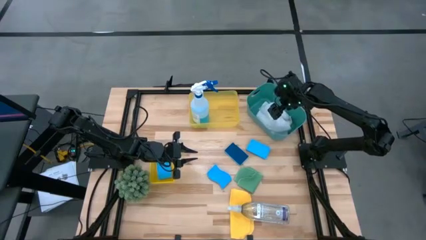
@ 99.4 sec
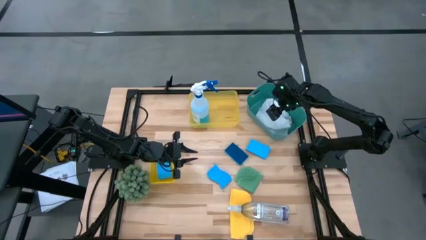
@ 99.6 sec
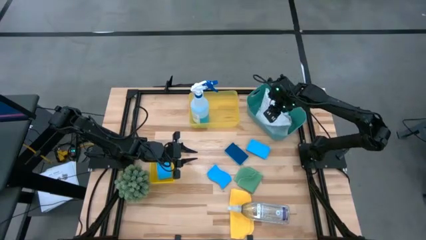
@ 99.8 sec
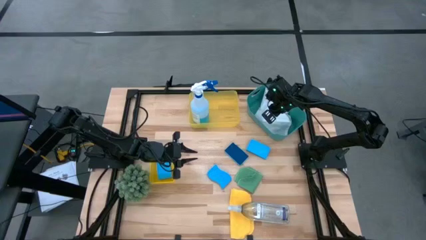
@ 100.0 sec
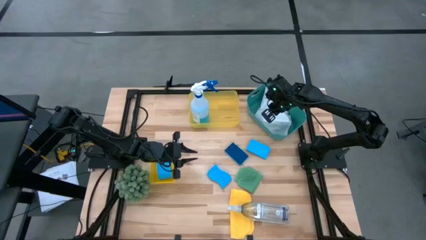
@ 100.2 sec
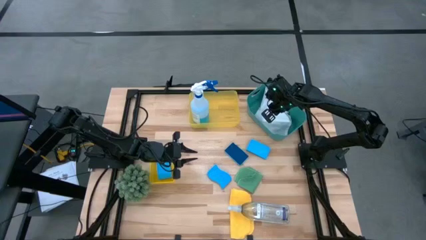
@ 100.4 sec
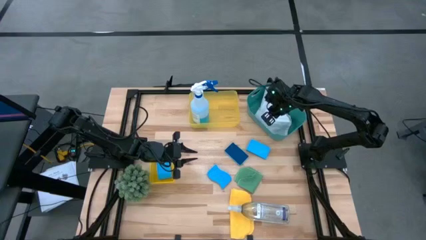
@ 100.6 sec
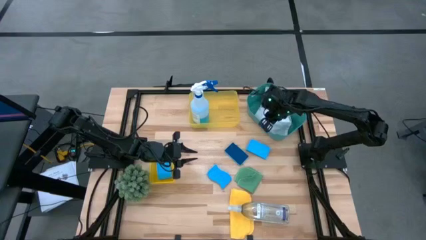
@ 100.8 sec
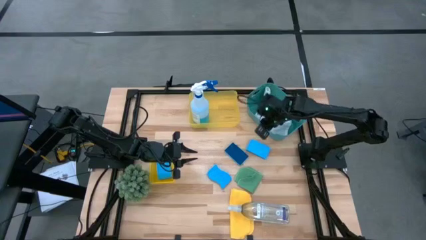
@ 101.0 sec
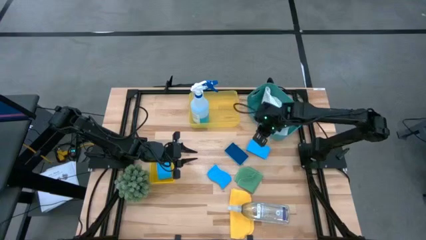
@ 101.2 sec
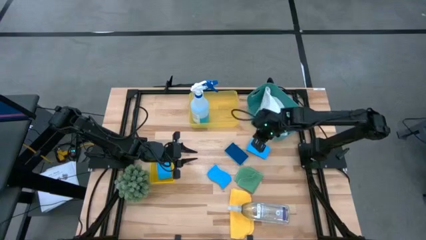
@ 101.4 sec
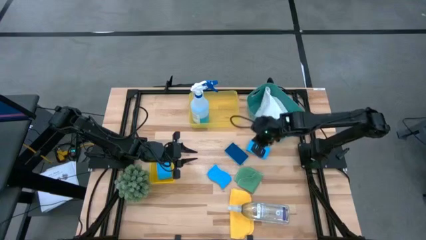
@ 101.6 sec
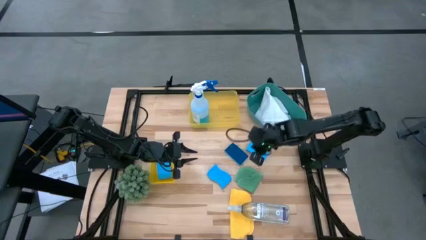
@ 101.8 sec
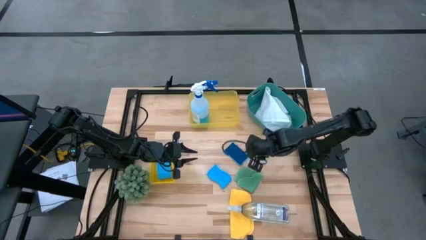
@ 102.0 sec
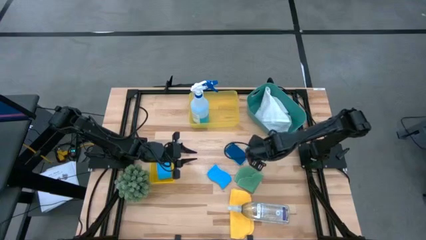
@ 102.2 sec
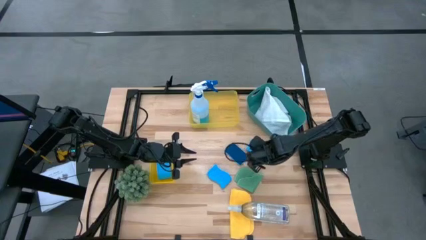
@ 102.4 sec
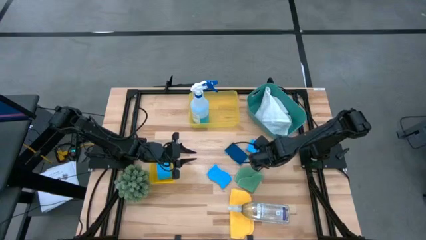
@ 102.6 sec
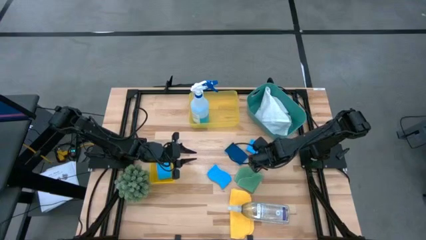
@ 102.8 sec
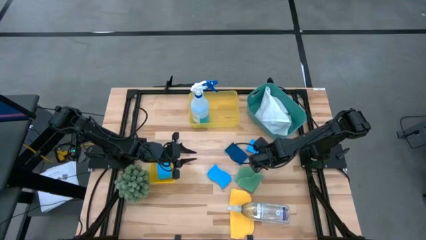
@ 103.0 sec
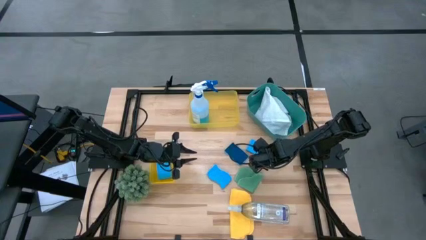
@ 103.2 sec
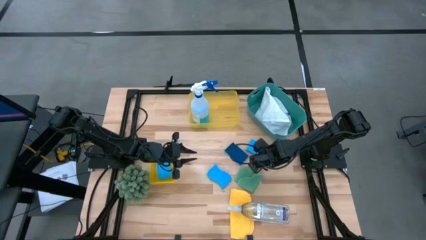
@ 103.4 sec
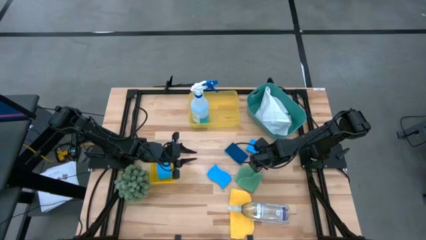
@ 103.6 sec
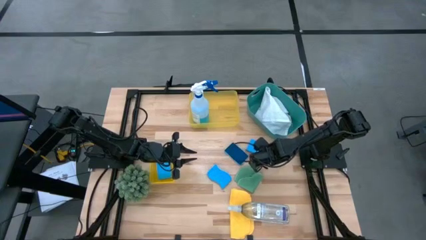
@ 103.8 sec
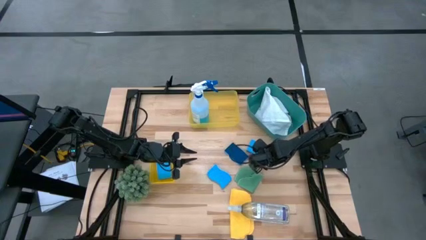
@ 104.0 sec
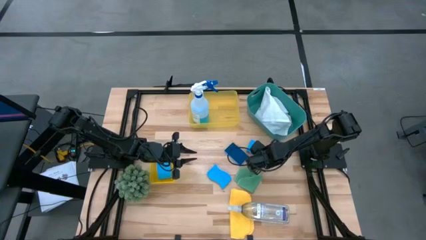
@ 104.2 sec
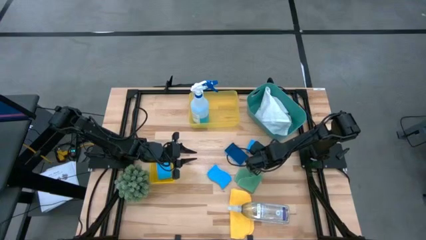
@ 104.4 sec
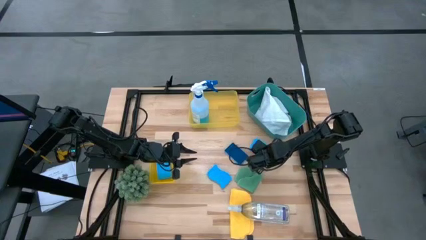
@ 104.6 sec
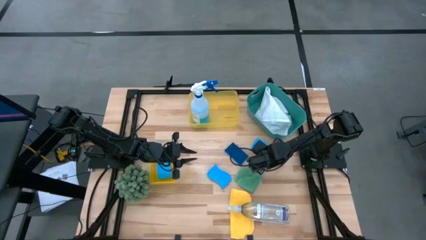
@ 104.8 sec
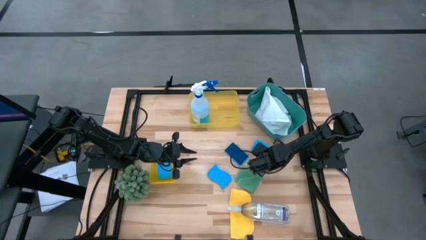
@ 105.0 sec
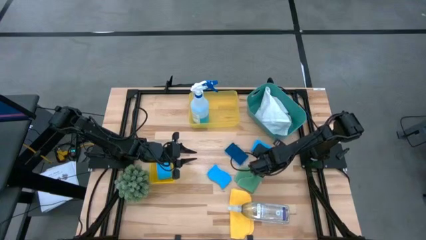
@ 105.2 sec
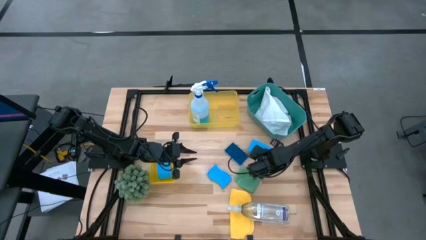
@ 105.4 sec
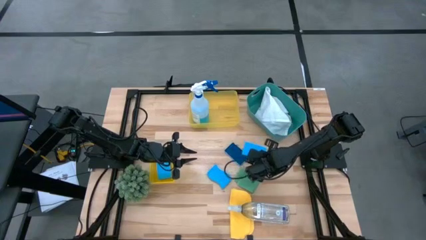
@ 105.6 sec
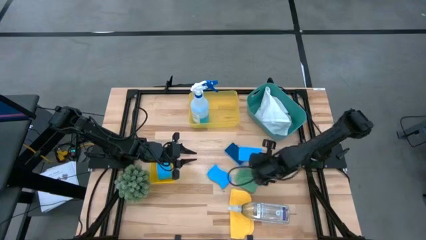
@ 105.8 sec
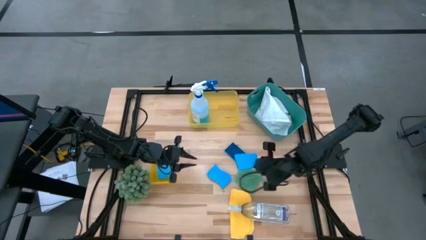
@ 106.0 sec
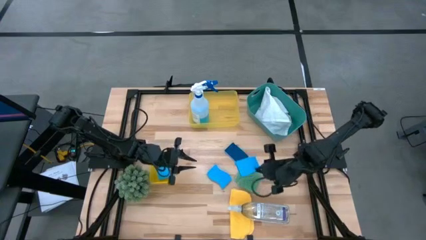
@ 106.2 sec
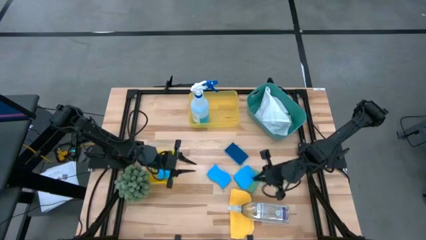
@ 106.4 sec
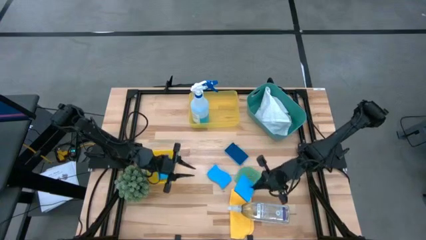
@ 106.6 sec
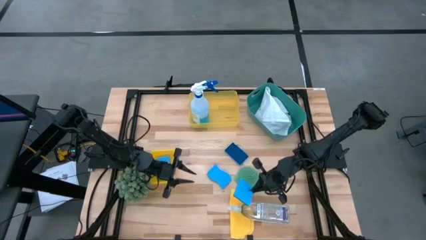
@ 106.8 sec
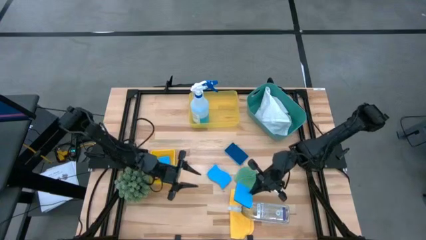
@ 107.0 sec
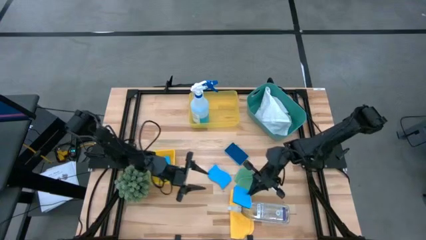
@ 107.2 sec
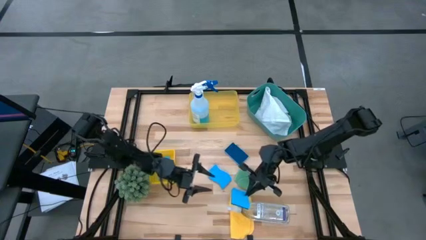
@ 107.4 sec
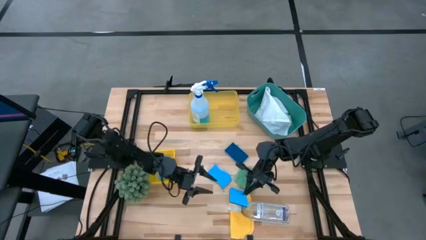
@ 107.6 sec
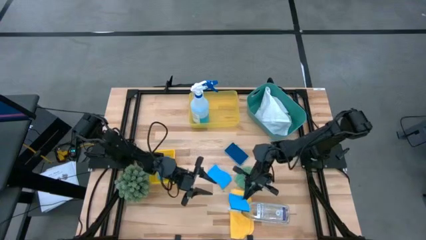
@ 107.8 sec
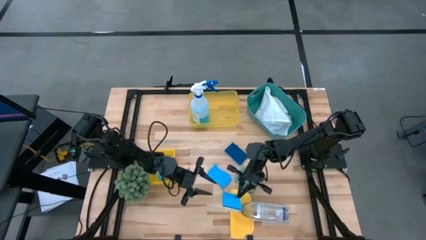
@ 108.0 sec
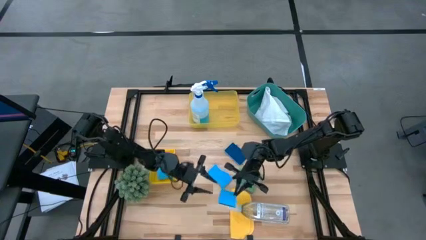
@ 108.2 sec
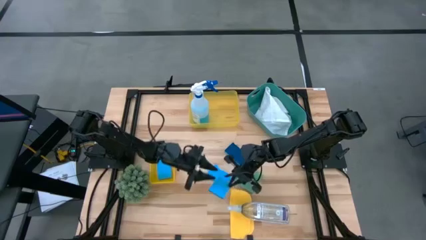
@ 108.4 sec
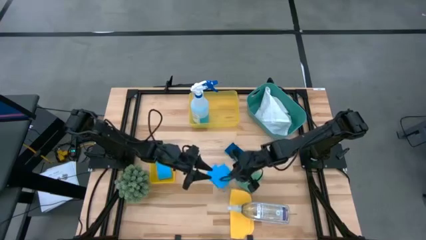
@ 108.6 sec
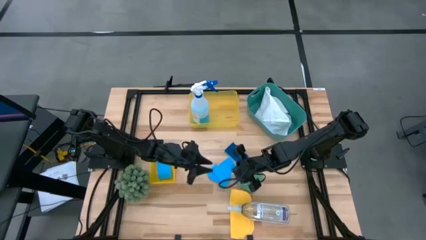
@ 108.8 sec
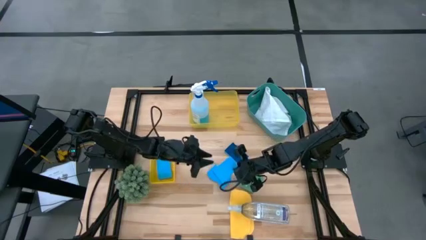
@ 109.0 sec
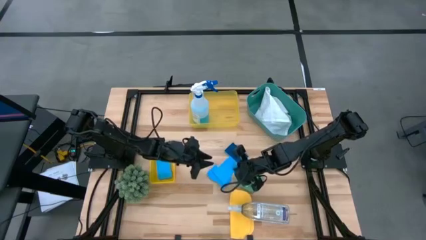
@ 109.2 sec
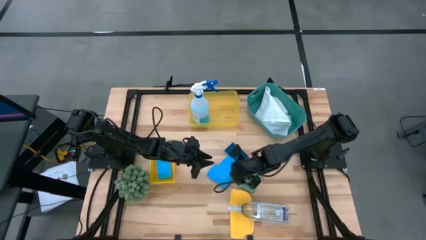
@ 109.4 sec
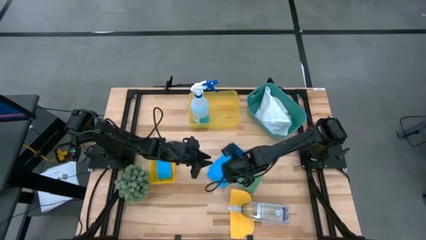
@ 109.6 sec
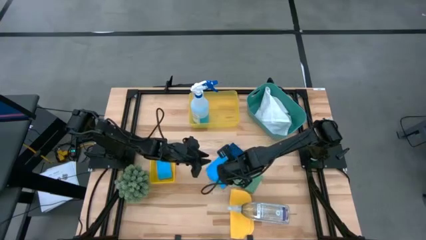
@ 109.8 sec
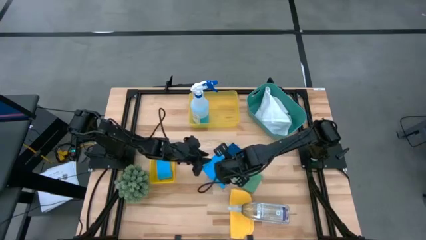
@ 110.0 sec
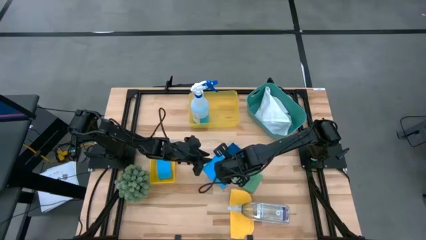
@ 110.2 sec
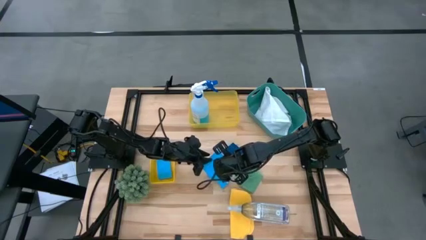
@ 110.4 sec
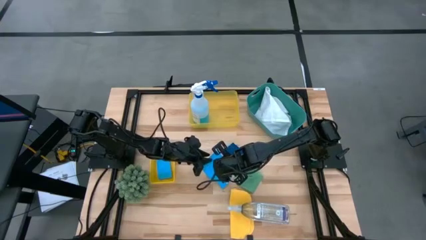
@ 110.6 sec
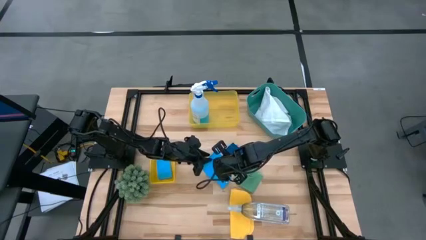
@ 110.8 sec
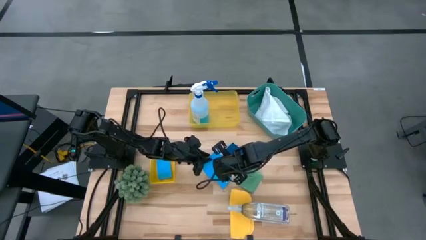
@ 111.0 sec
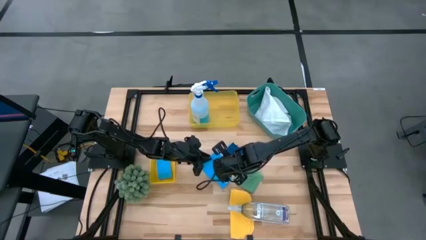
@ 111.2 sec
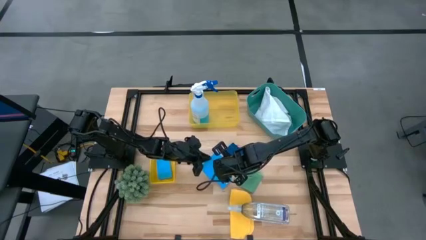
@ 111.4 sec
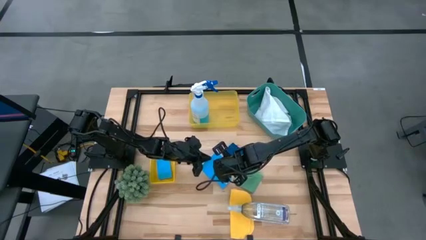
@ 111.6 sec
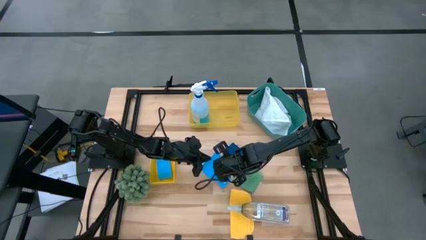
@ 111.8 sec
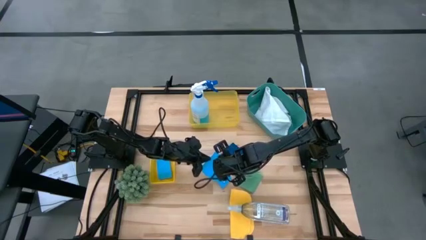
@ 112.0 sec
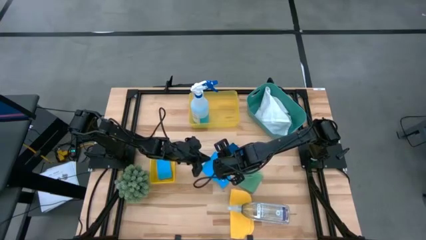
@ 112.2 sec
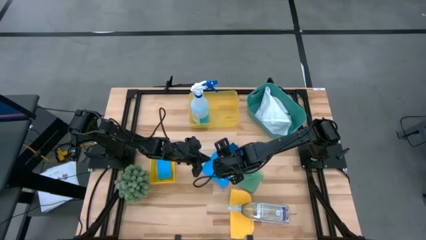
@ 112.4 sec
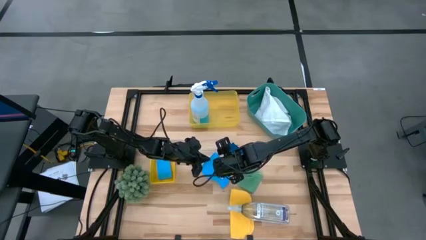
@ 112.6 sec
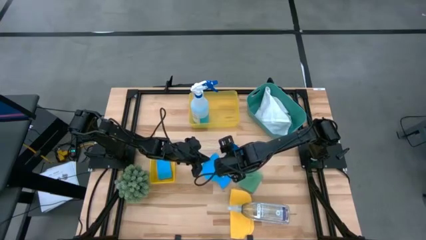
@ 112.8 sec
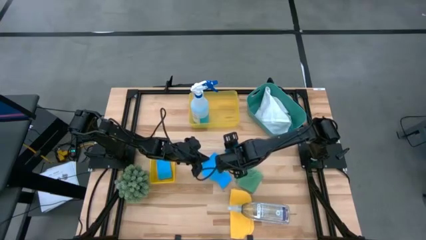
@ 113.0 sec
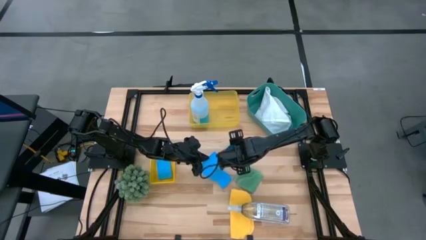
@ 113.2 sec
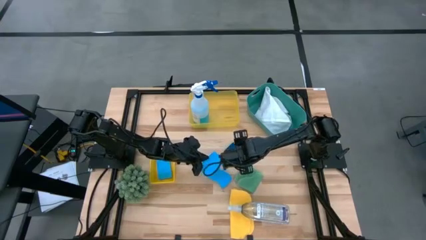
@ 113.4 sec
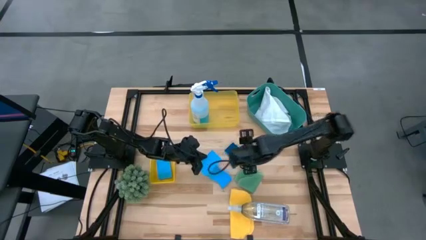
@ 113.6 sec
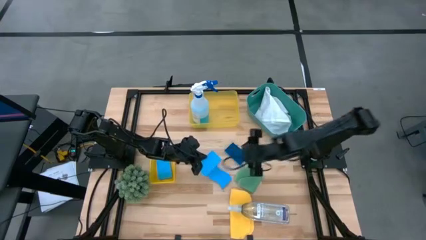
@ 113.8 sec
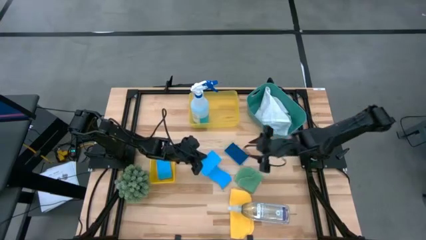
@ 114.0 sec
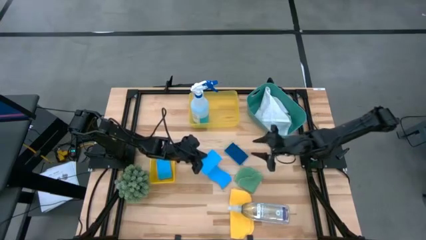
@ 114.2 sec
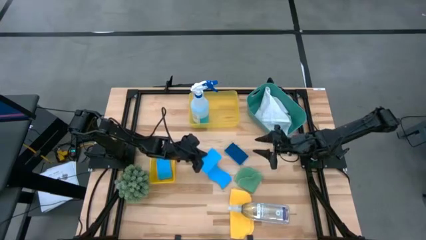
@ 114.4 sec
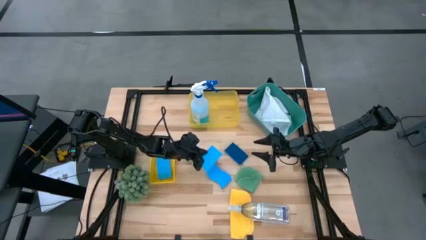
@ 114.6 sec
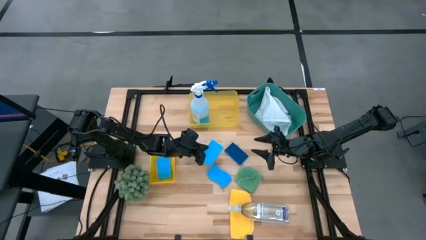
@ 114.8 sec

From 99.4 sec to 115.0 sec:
Task: Pick & Place Kitchen Items
Put the blue sponge into the bottom yellow bin

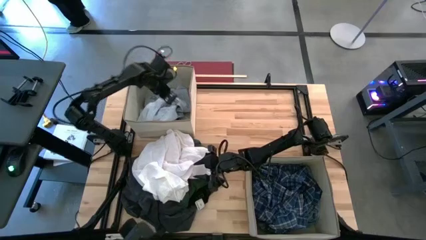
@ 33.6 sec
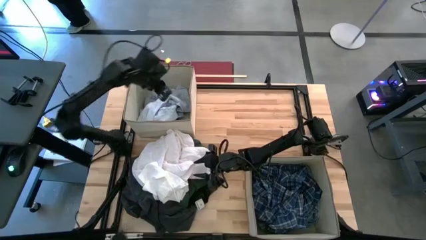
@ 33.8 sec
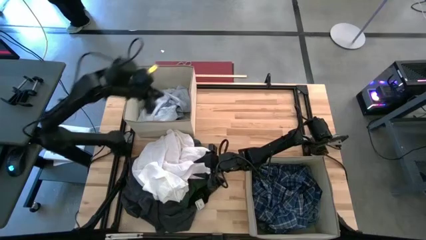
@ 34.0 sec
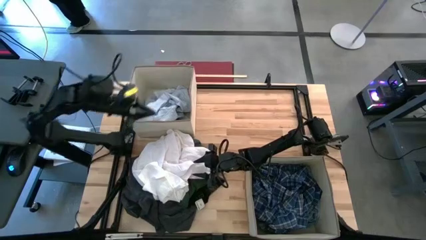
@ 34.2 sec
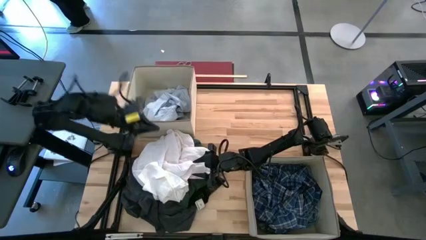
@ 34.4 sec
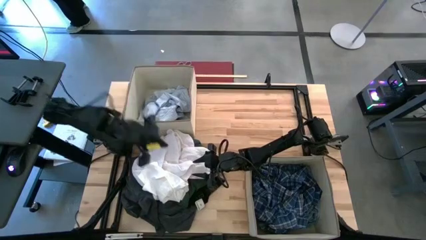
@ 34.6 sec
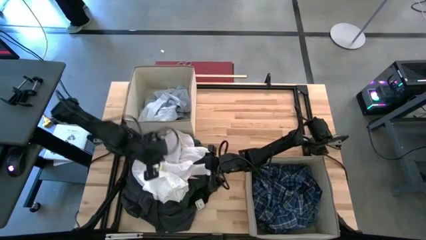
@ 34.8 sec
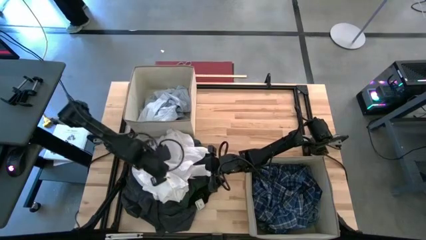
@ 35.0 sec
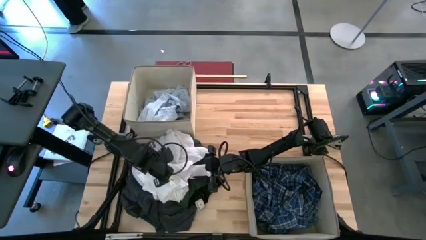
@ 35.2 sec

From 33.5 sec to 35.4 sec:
Task: Sort clothes
Put the white polo shirt into the top laundry bin
